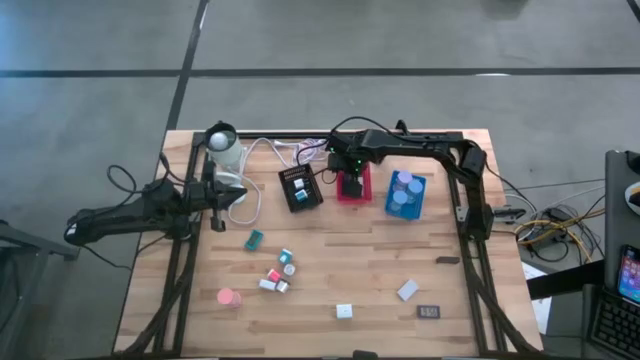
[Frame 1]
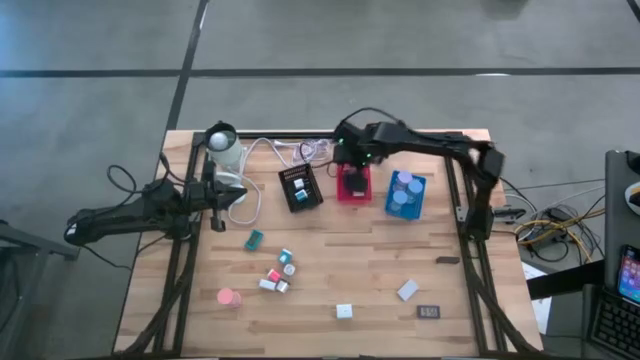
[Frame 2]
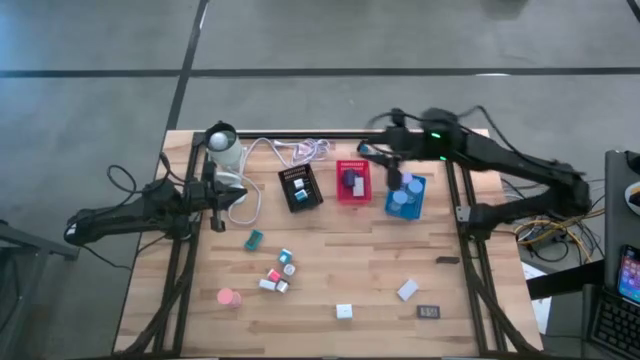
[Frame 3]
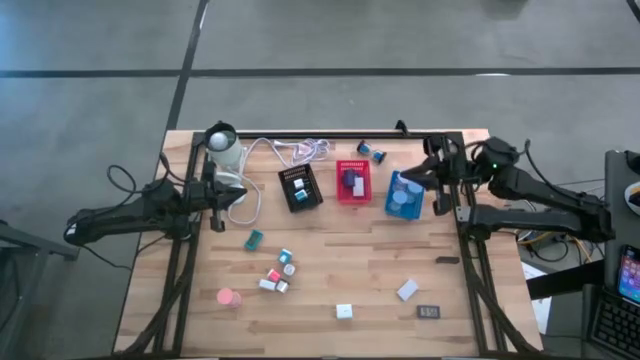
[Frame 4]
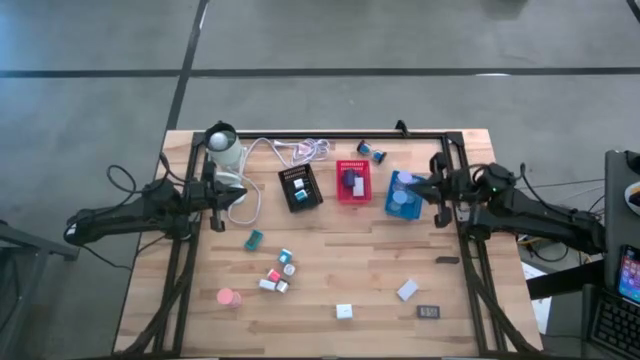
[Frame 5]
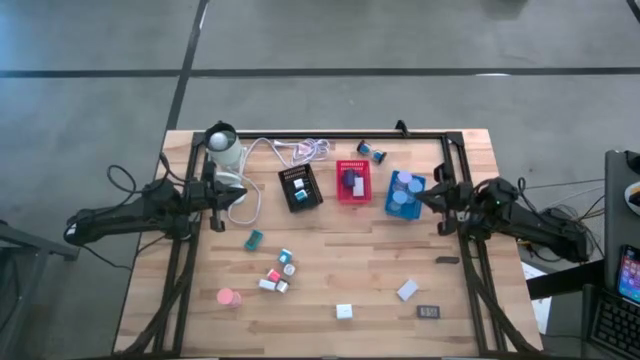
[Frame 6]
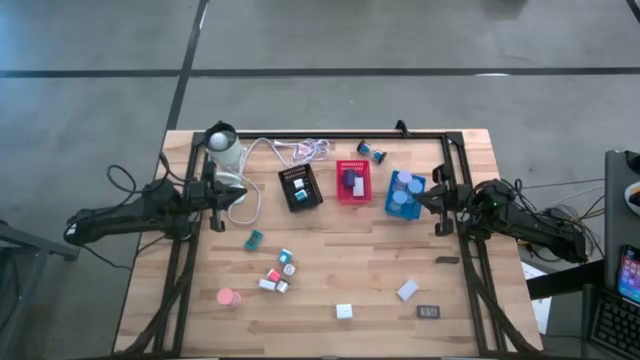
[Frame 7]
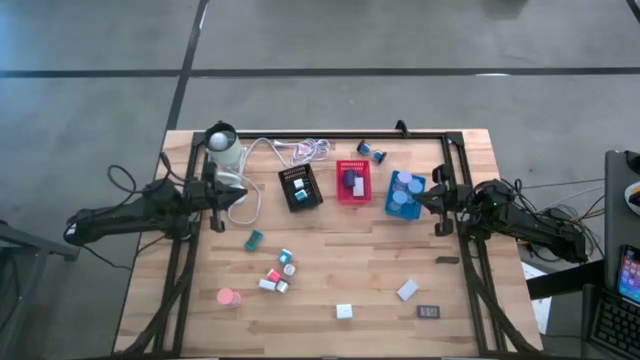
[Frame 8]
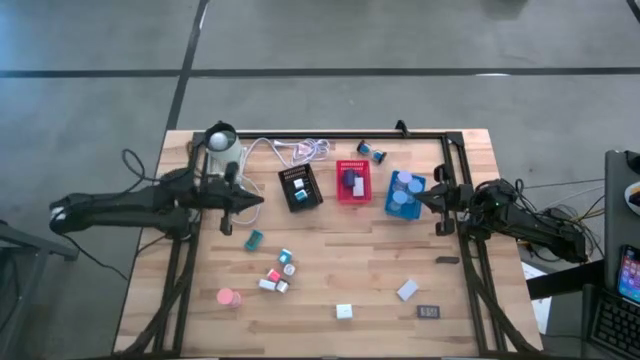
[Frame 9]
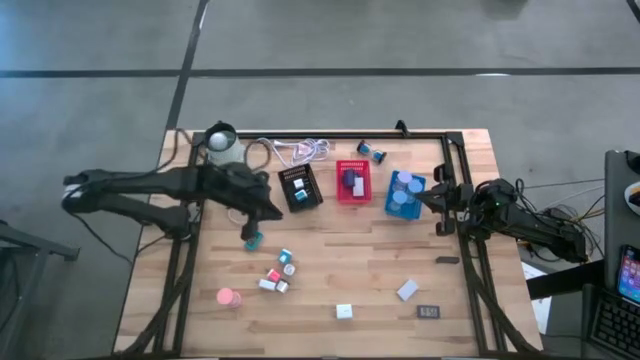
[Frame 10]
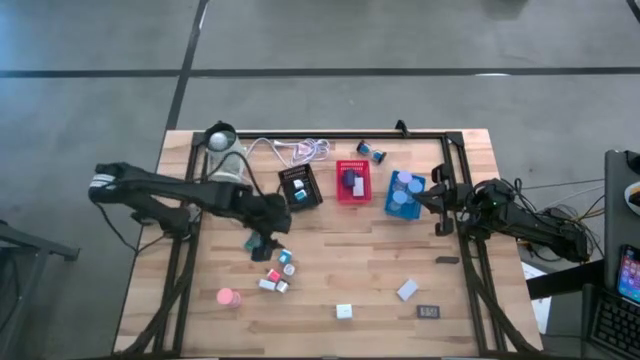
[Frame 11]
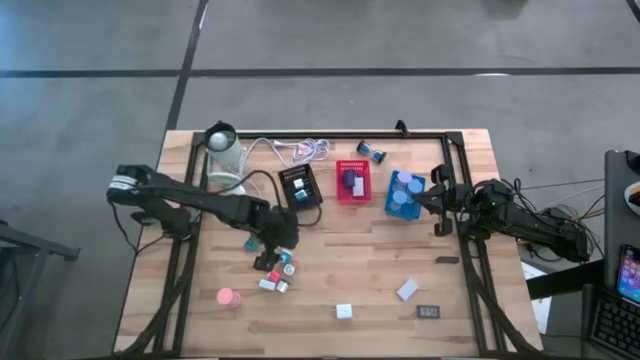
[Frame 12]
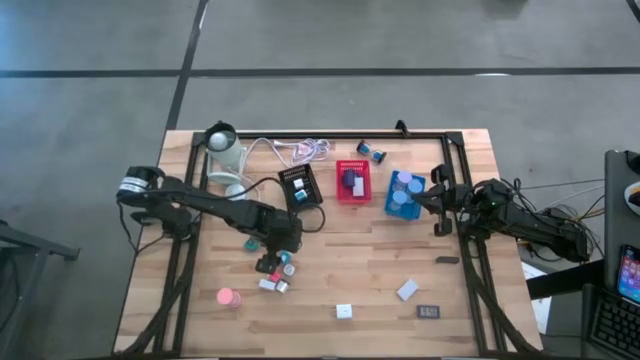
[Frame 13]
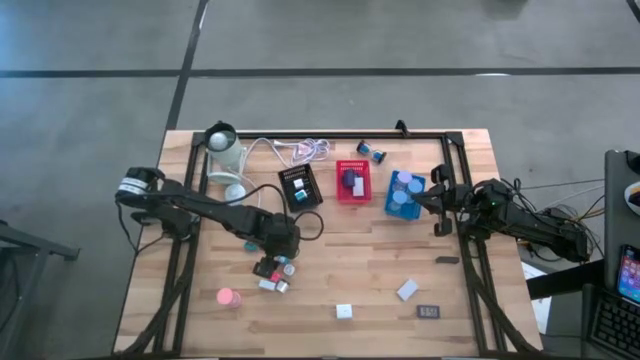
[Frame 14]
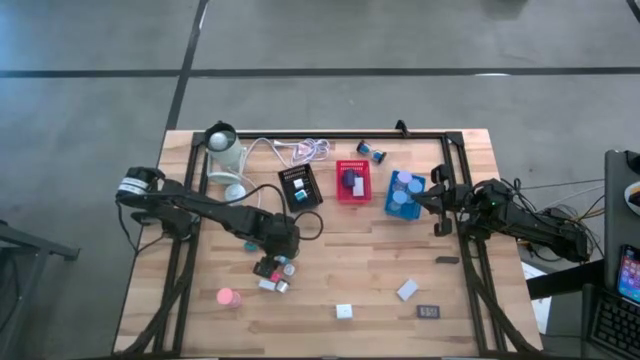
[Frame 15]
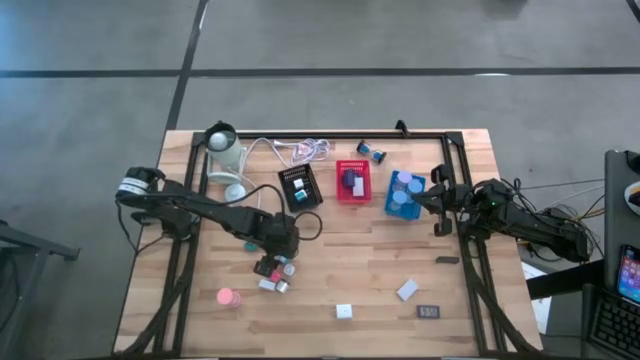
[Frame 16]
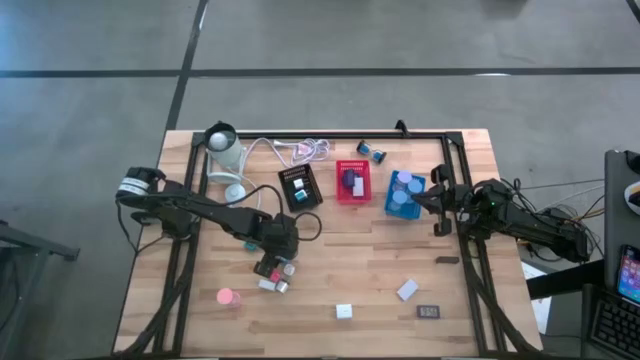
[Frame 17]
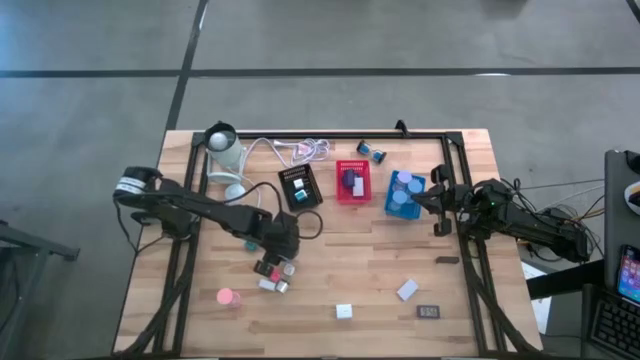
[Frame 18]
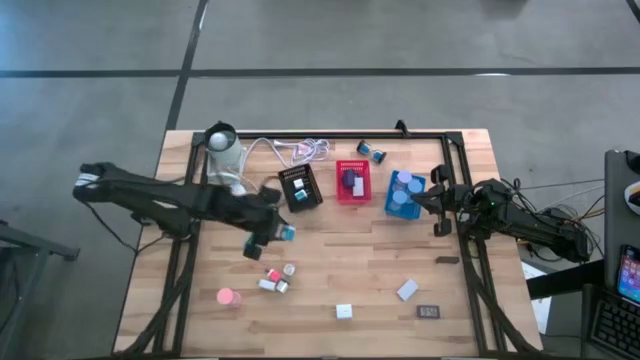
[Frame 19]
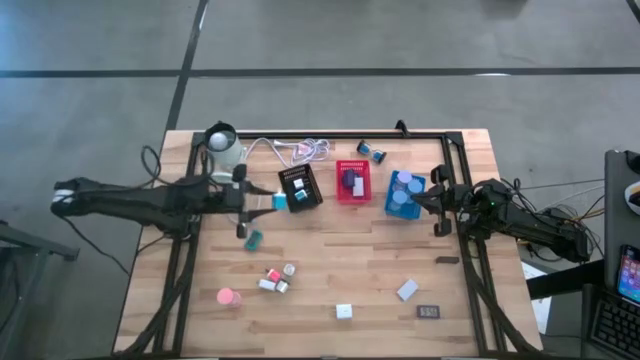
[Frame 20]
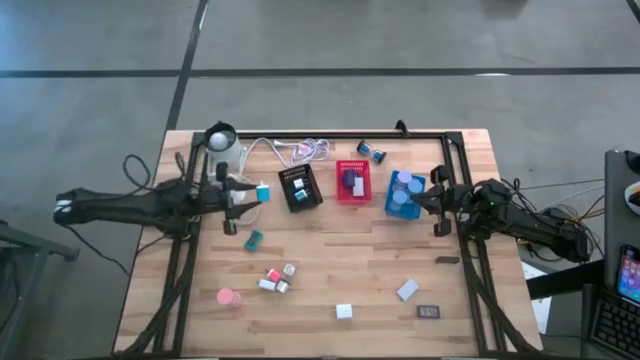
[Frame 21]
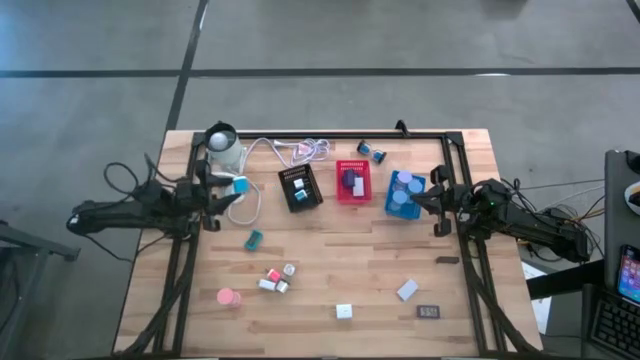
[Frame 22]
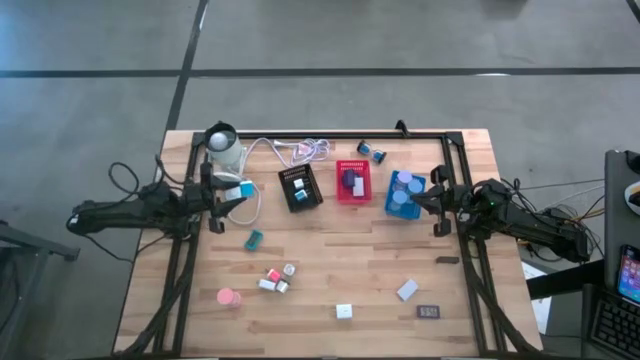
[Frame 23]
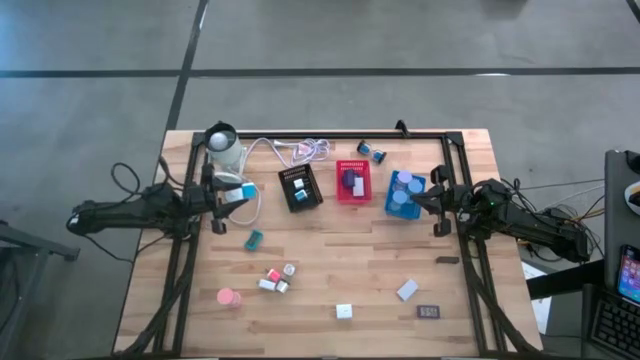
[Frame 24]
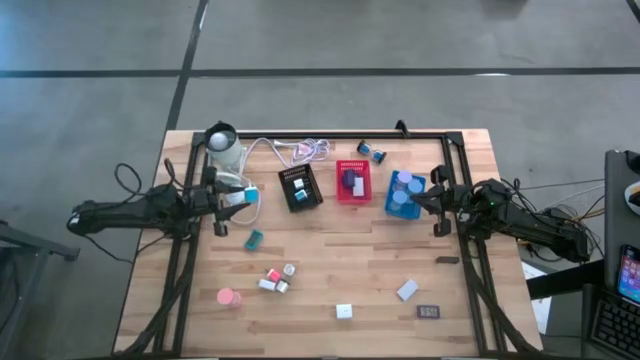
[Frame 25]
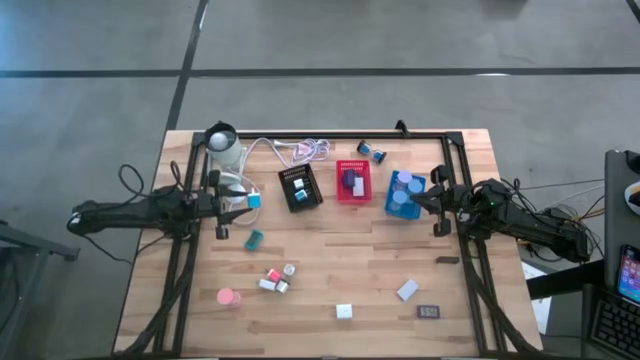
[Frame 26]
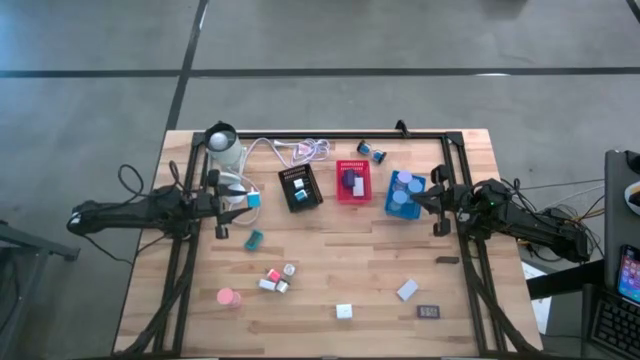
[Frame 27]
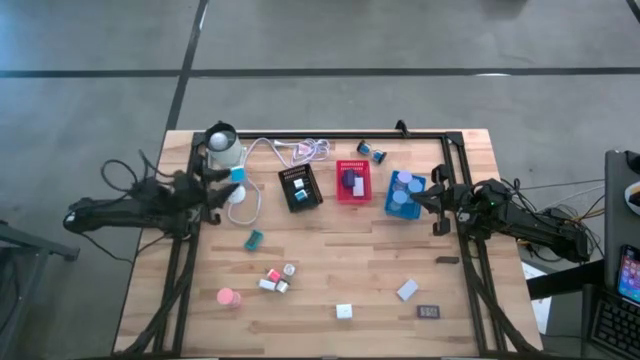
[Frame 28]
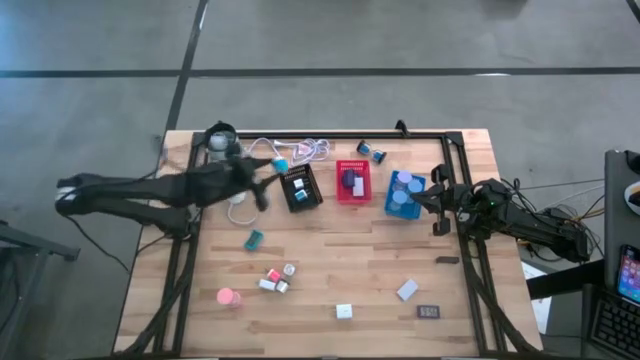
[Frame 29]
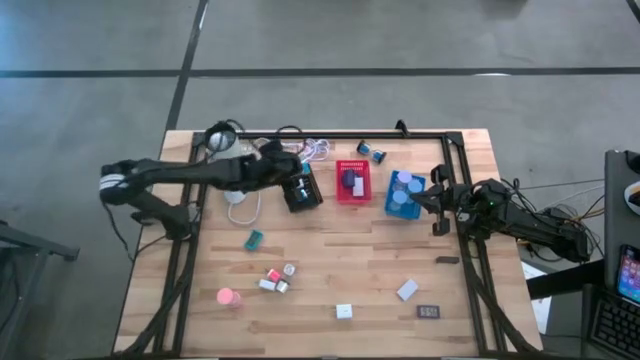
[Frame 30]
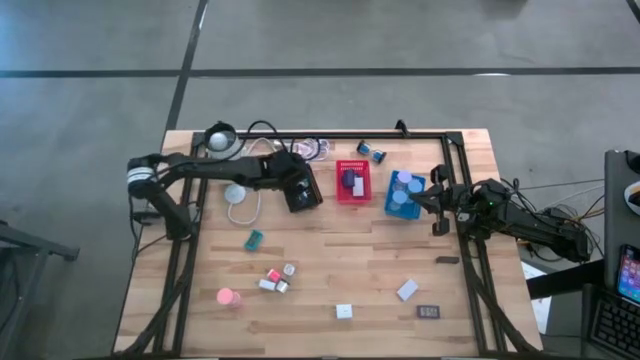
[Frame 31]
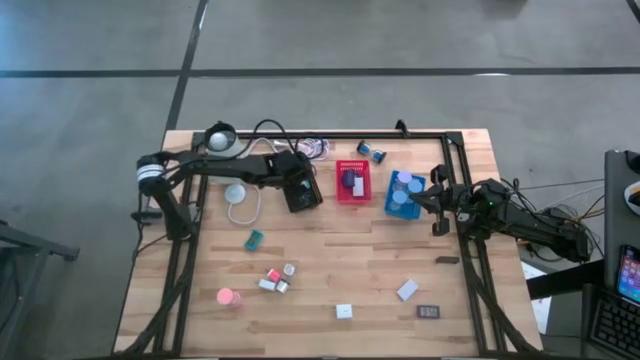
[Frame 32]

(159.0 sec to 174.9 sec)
Task: Pick & Place Office items
Put the blue charger adapter into the black bin

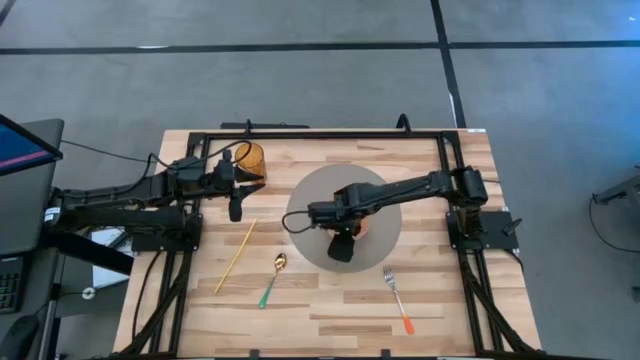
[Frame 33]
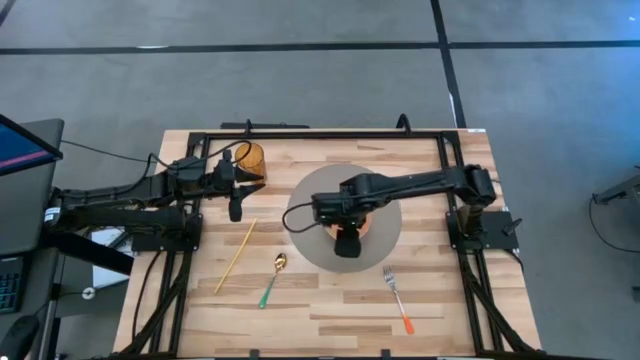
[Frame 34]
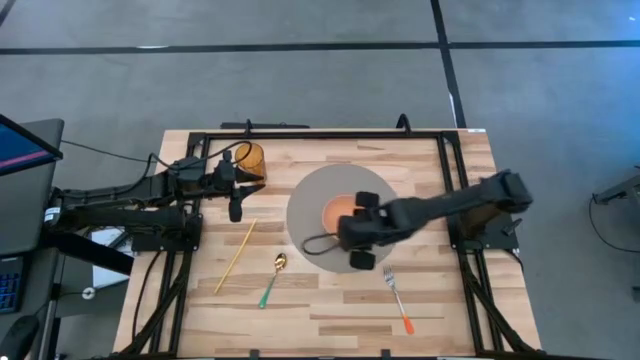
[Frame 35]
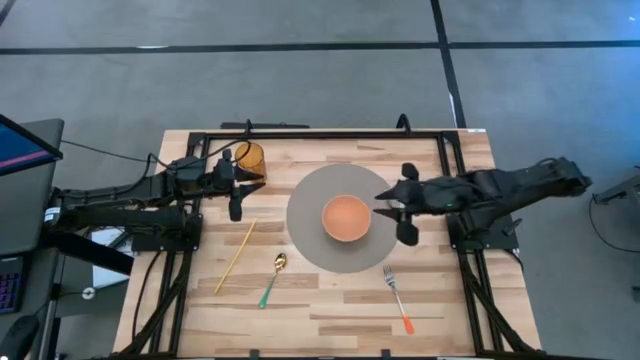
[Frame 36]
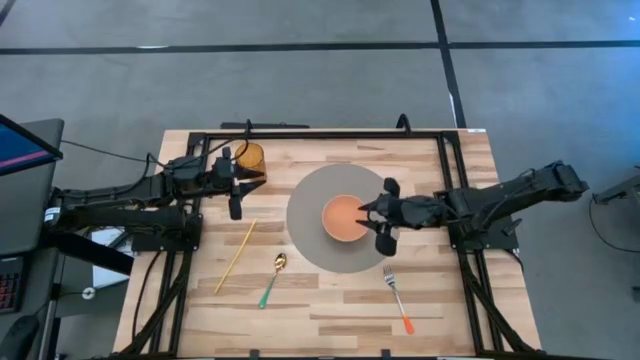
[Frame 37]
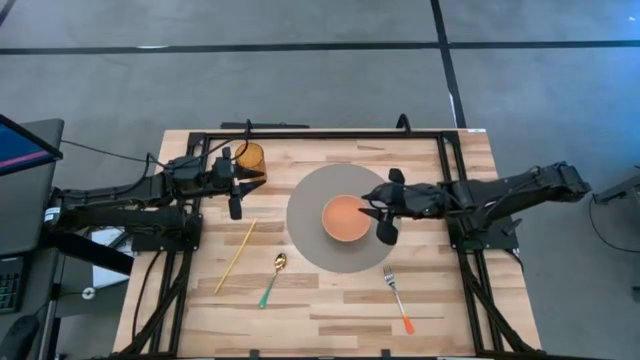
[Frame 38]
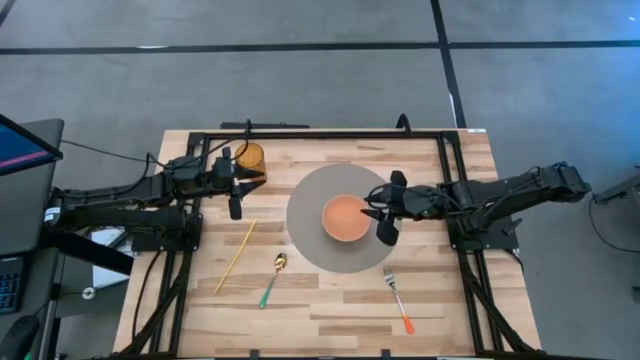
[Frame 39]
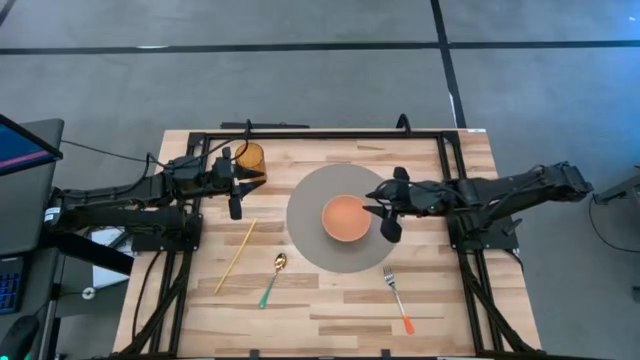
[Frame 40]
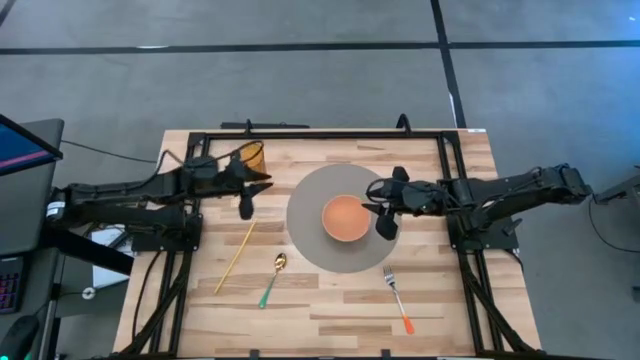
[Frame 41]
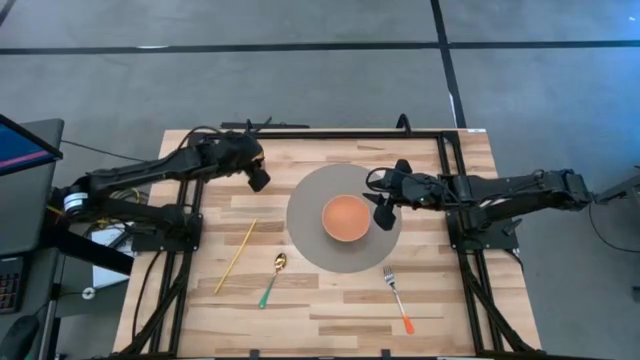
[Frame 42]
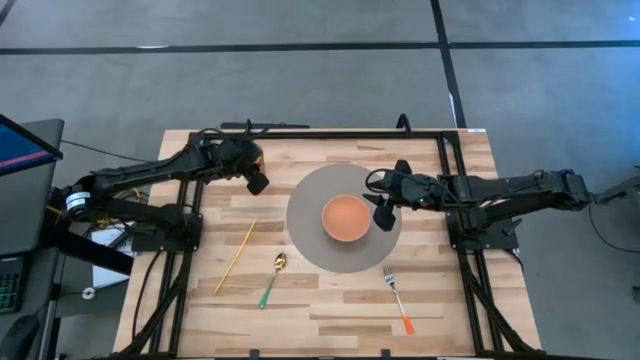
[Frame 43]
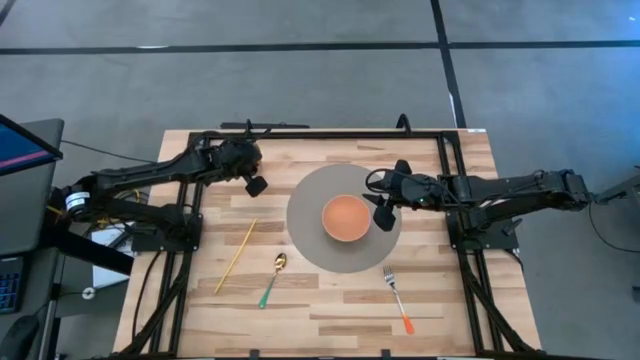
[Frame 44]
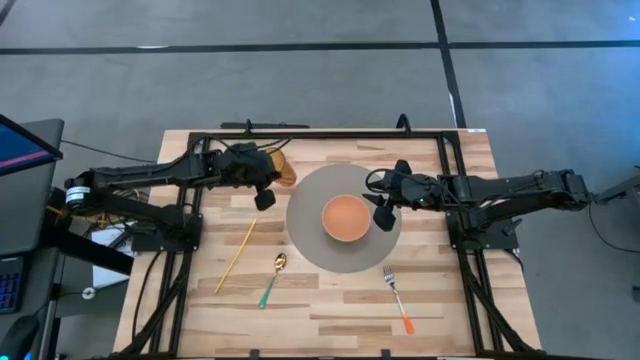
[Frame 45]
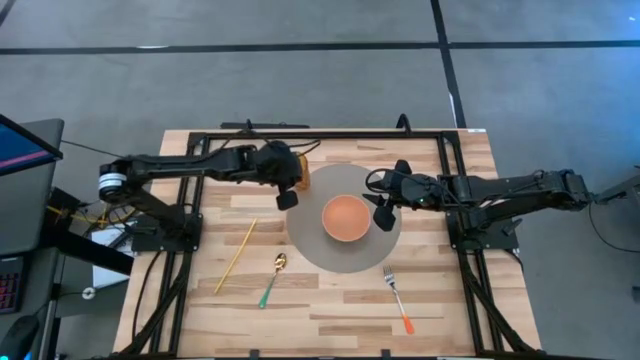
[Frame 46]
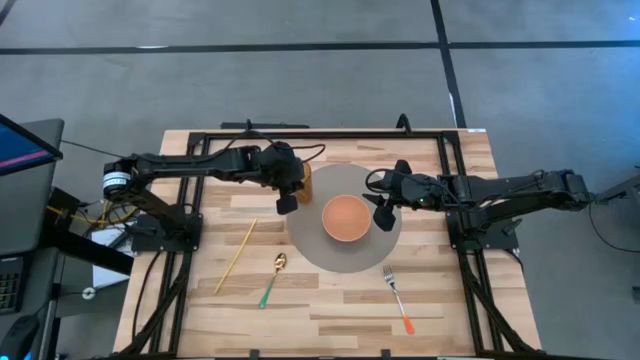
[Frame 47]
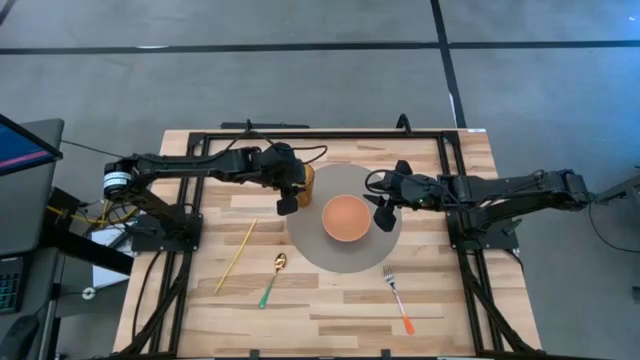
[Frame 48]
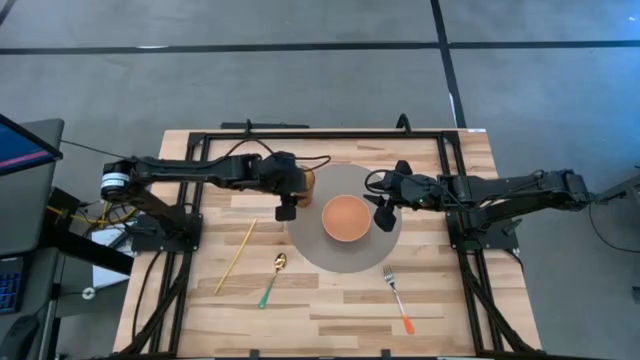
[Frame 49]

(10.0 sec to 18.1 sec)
Task: Pick & Place Utensil
Put the brown cup on the gray table mat to the top left of the light pink bowl
